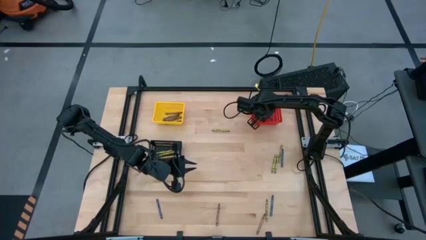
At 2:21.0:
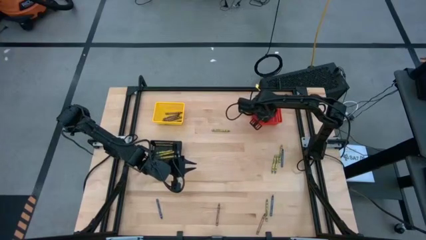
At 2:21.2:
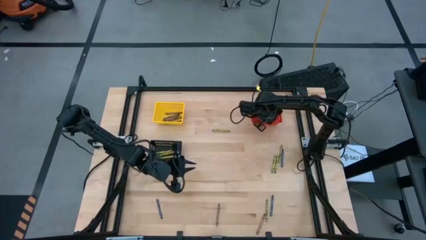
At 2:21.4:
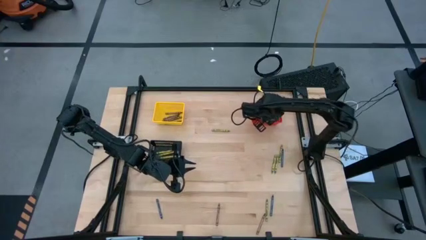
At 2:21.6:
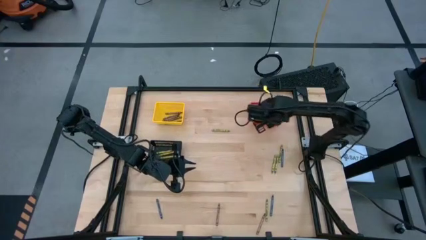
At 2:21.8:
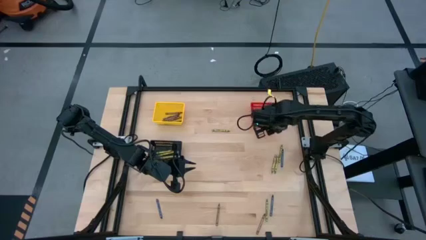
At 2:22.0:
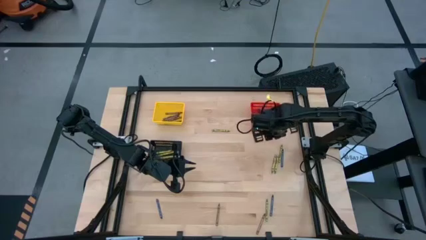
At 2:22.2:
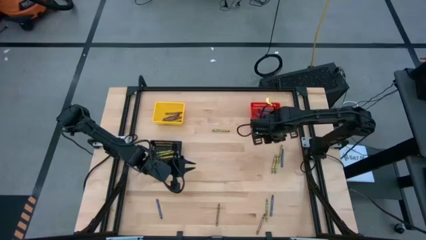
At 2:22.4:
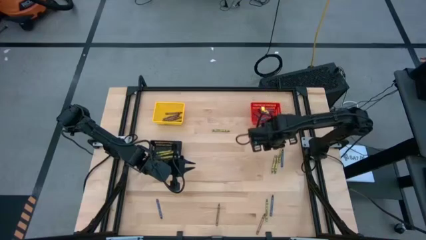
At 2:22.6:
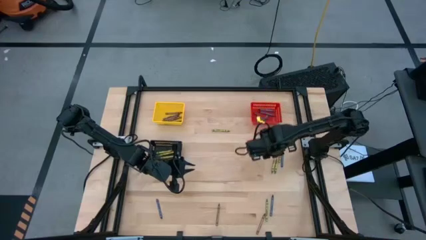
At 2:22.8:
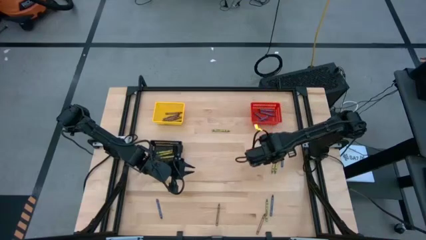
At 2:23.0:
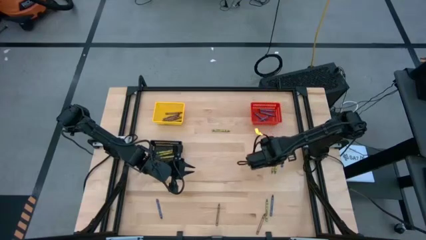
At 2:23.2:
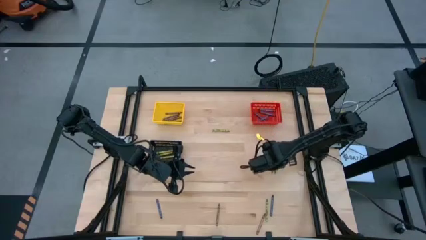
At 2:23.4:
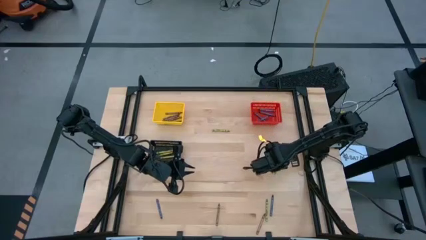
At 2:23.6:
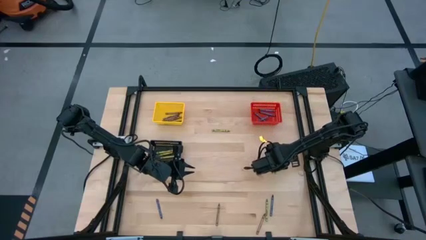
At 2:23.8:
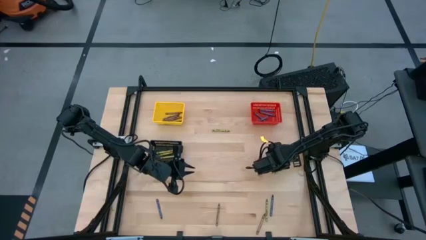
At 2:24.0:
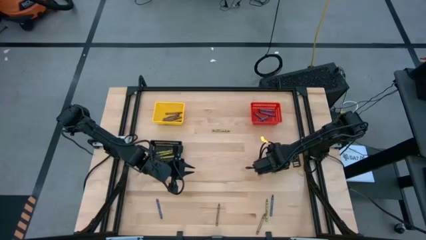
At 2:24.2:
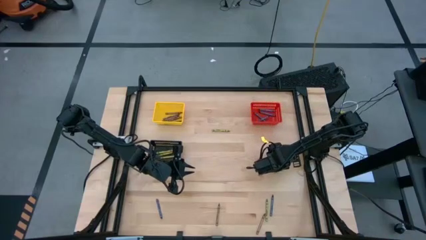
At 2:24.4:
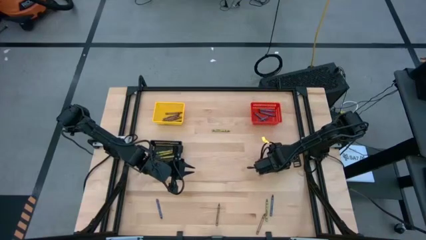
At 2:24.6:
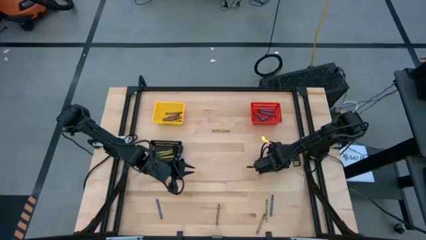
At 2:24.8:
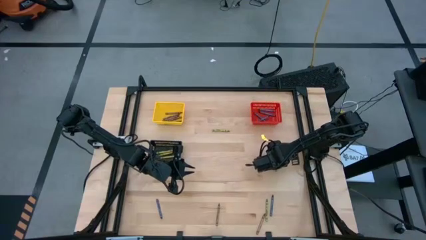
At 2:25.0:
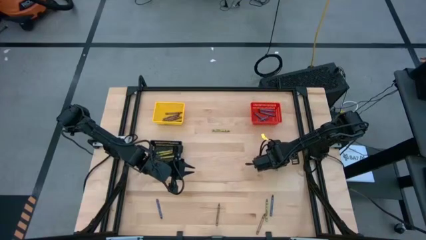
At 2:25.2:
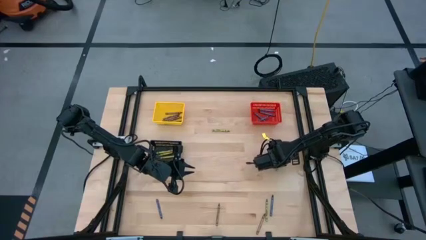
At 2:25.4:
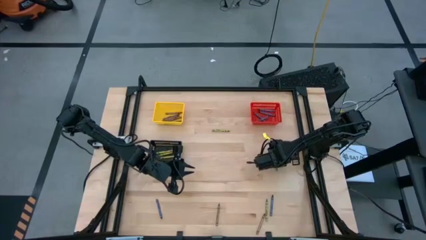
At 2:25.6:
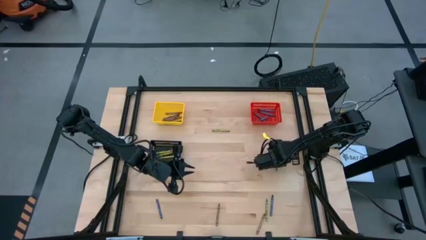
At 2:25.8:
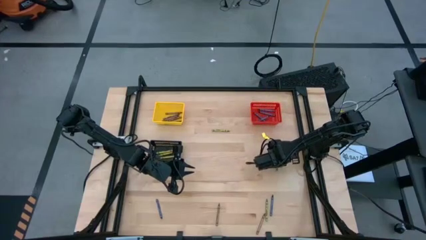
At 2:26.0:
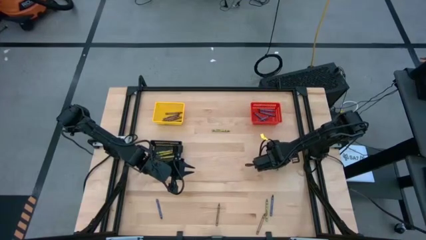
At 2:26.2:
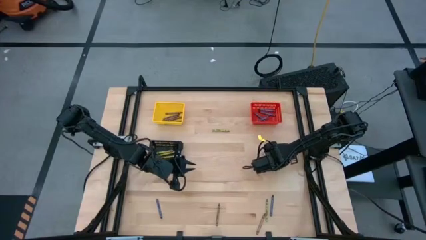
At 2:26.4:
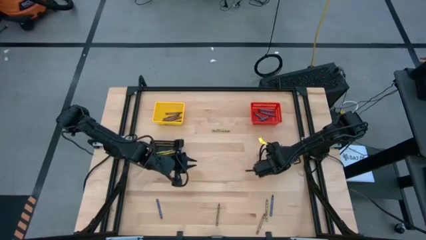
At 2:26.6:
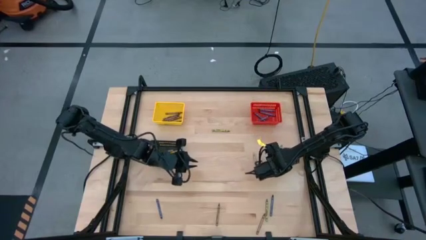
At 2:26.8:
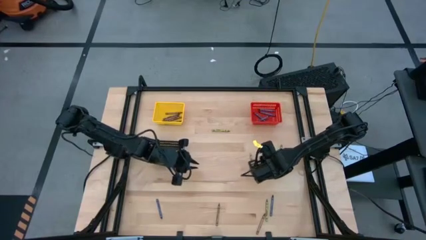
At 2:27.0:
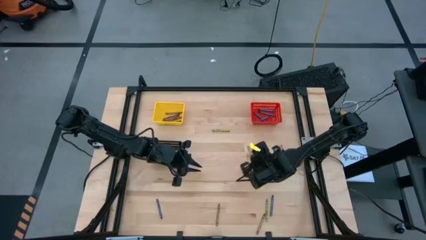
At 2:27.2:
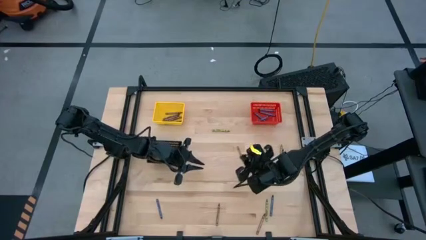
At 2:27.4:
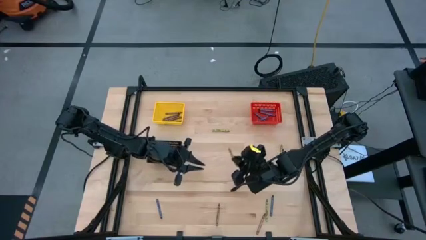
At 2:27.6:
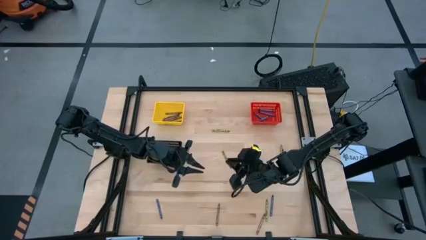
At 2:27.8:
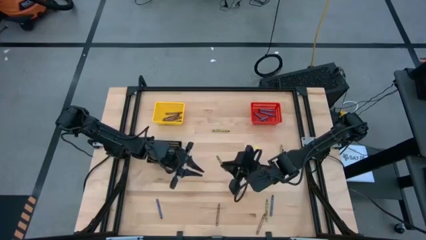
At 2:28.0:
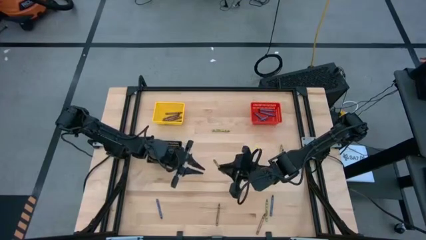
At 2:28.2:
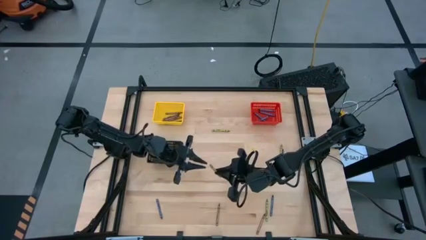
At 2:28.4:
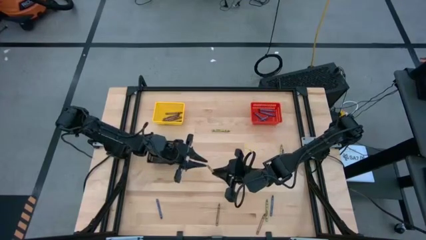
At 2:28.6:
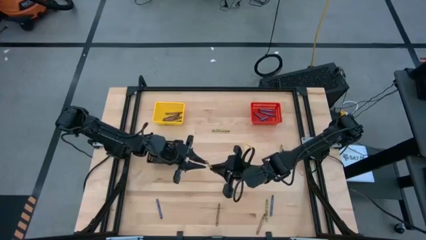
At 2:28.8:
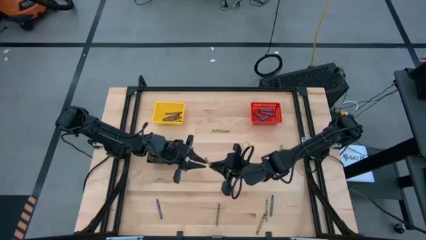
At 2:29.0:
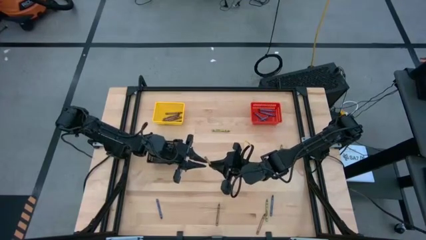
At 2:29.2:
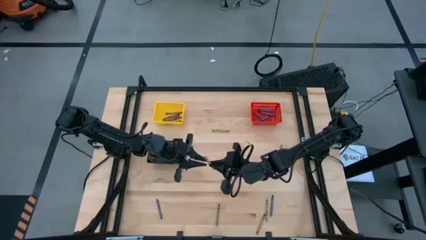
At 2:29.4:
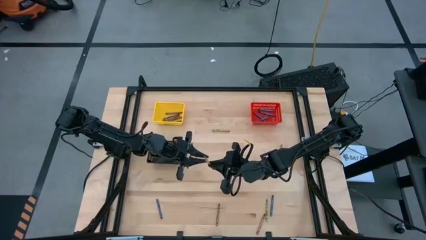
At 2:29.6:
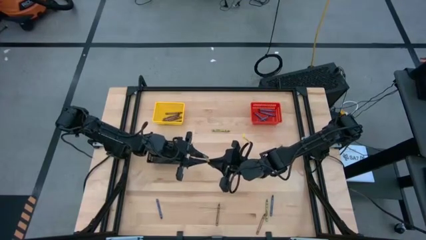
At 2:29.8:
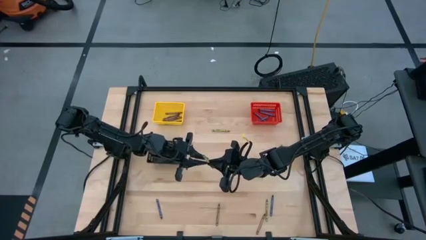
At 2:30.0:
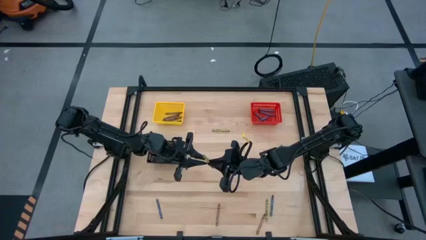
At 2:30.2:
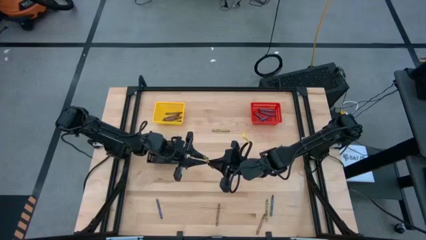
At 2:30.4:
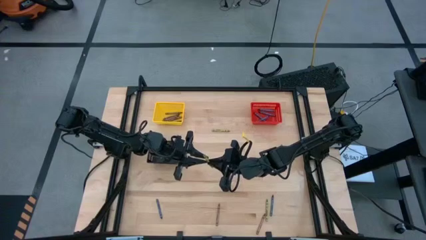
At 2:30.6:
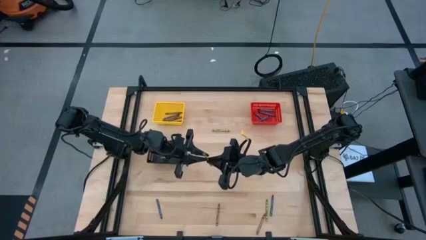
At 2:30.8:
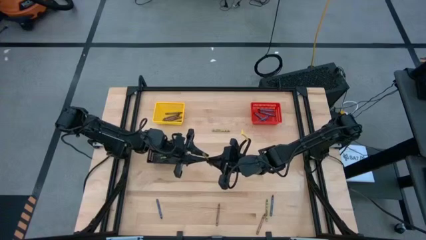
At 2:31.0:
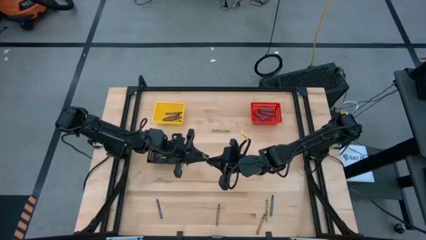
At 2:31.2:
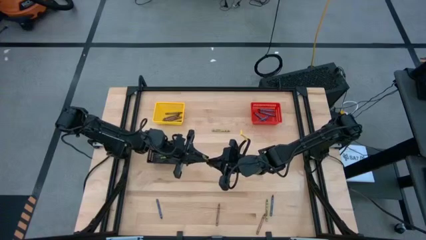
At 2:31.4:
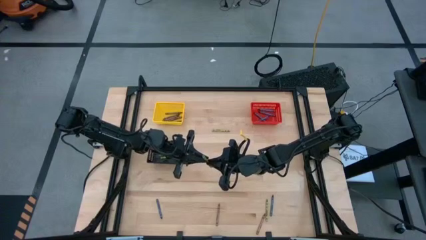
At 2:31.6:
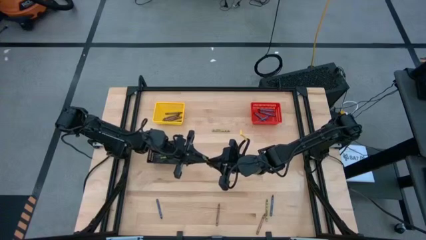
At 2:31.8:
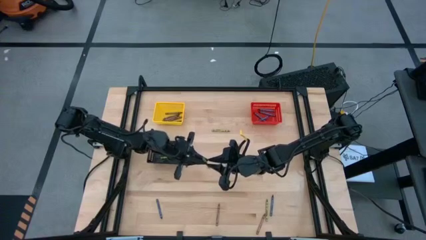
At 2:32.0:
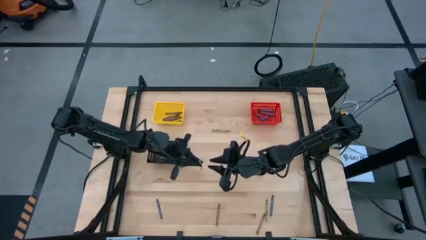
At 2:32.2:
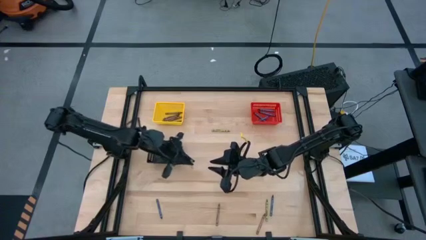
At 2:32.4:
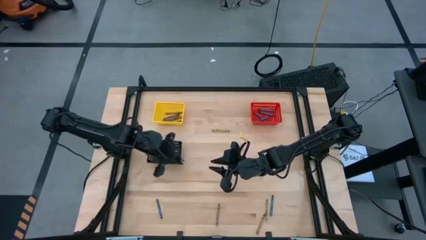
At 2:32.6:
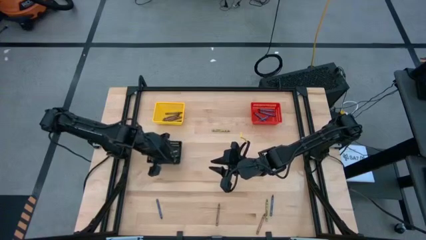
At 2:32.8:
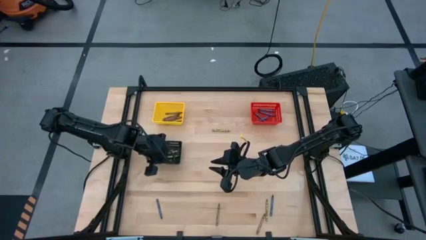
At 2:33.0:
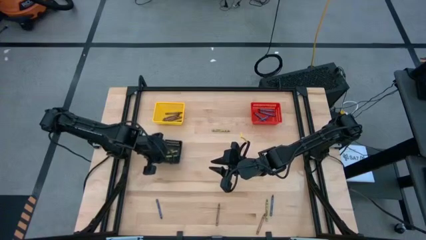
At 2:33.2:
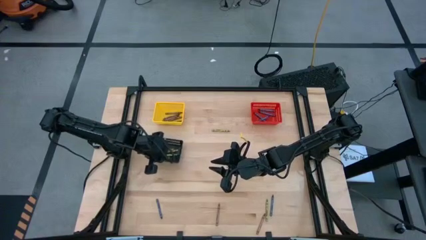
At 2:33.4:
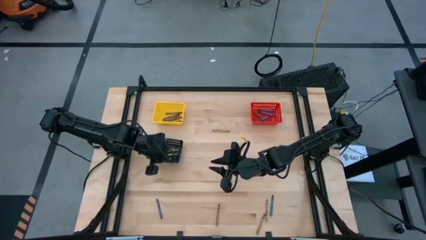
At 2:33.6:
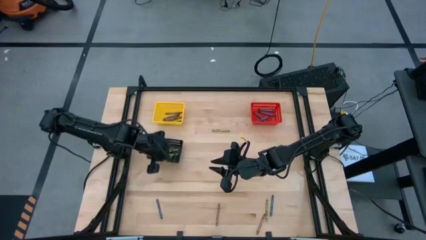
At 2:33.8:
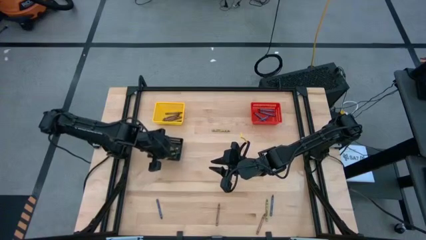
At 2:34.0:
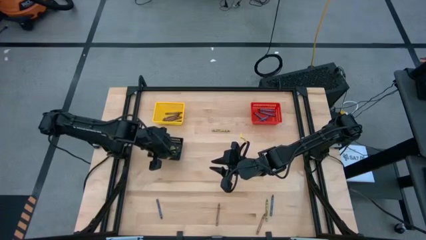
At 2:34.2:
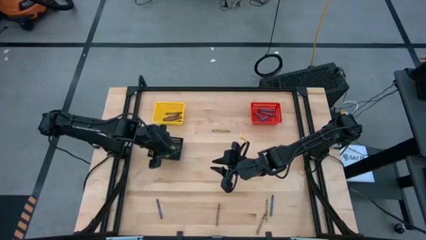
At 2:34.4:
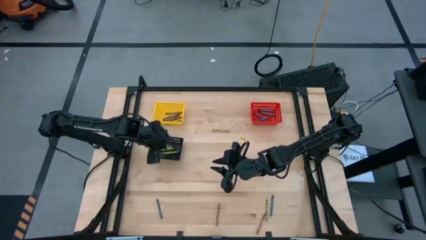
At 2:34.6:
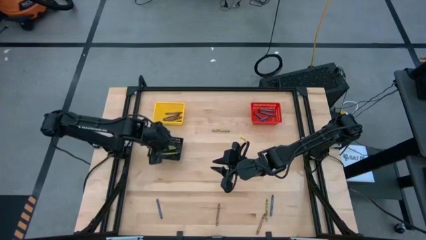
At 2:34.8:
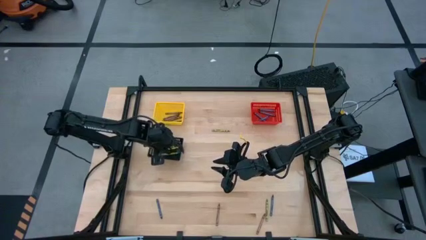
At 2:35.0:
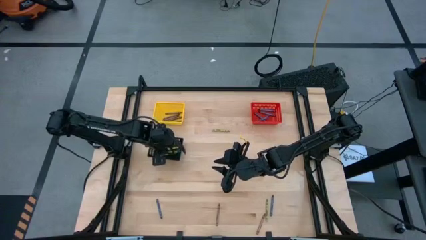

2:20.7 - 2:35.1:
Task: Sort crayons
Put the green crayon into the black bin

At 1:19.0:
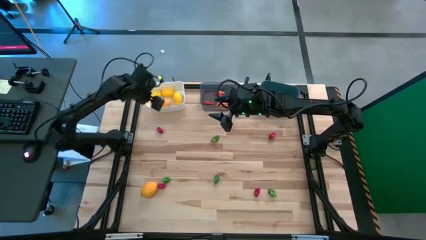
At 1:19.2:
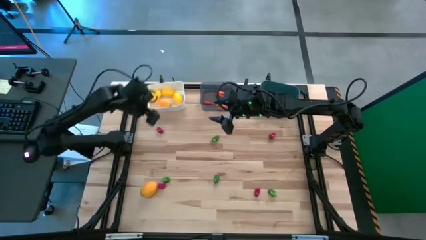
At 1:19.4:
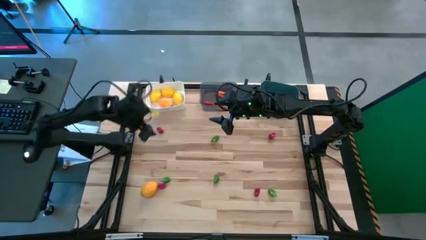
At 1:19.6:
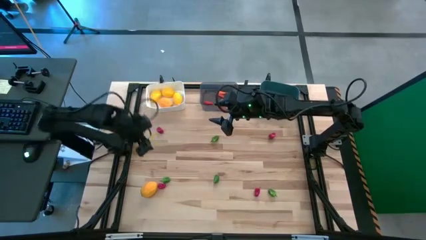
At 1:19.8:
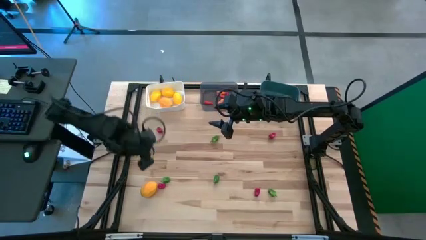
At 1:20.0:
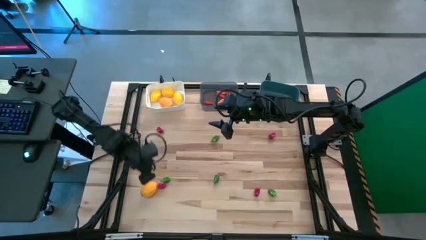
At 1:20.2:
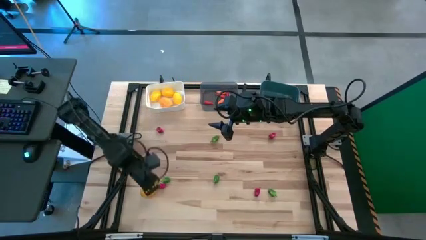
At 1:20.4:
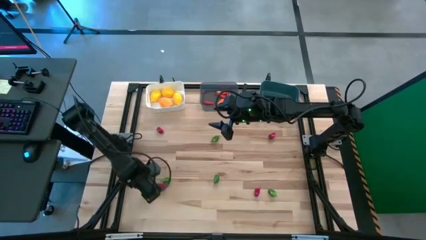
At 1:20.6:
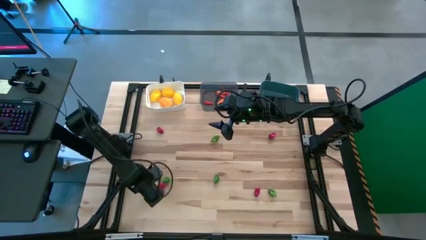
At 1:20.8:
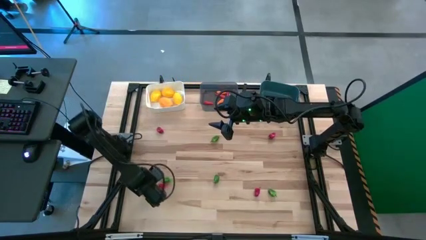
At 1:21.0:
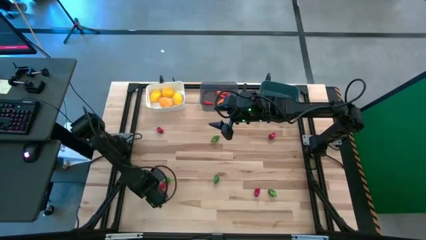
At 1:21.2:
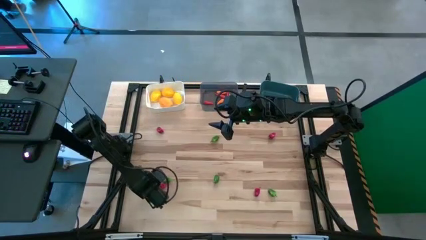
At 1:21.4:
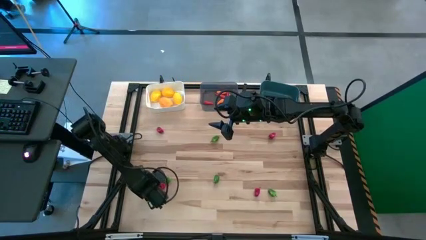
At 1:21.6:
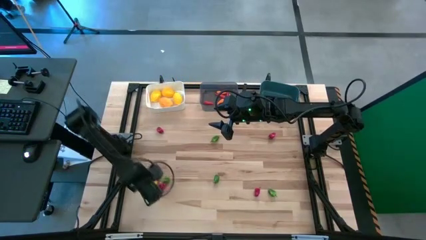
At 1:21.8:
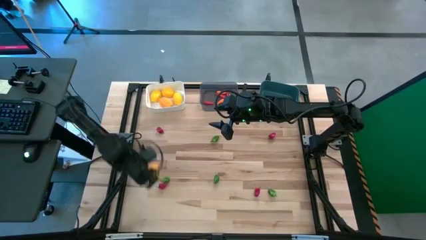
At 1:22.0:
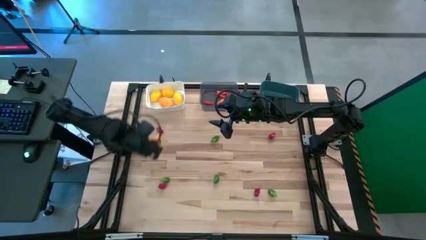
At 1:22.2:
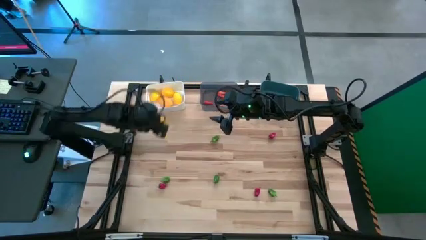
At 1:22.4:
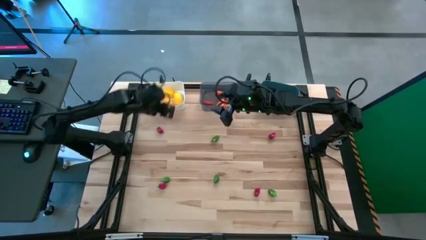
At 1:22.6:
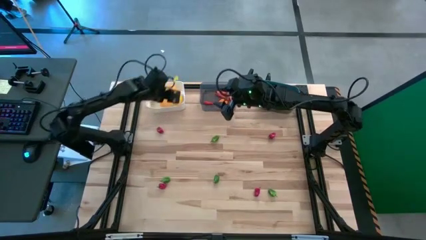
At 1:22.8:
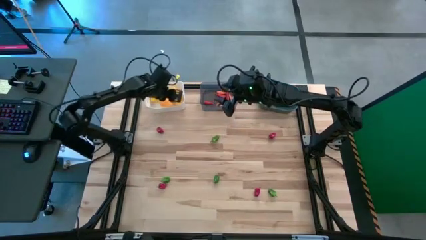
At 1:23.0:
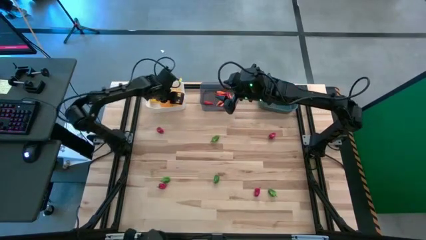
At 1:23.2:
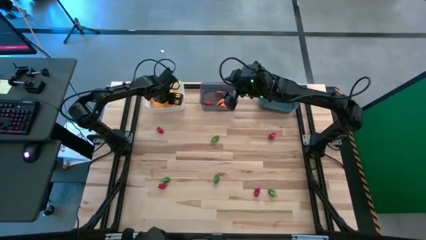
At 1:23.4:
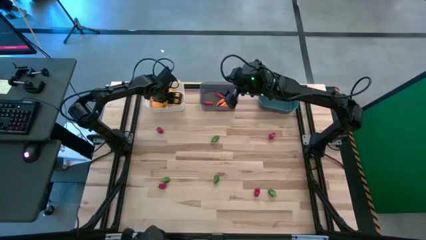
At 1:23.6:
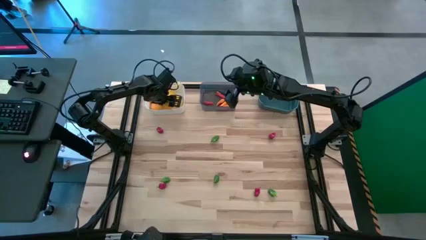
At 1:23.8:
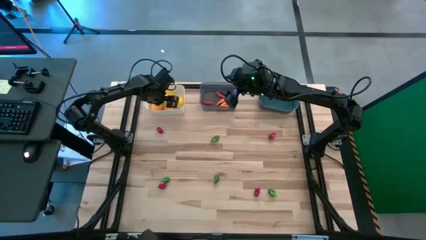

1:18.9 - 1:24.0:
Task: Sort produce into baskets
Put the yellow lemon into the white bin
